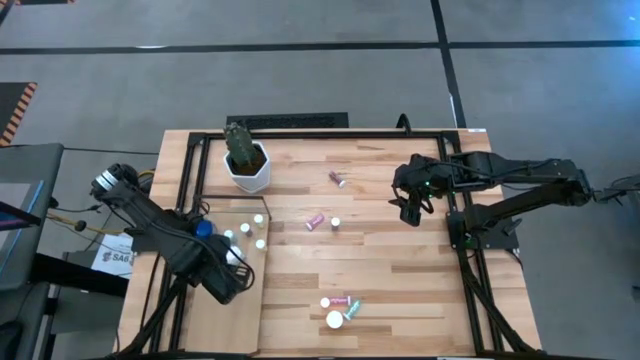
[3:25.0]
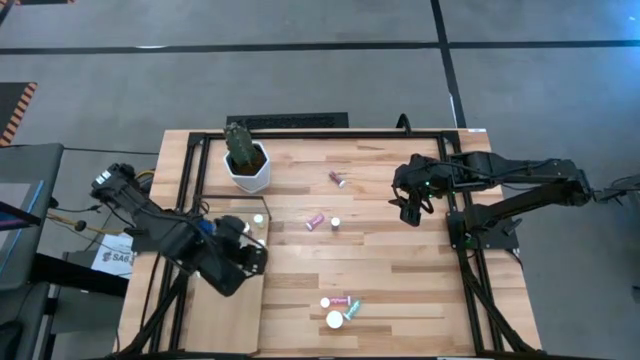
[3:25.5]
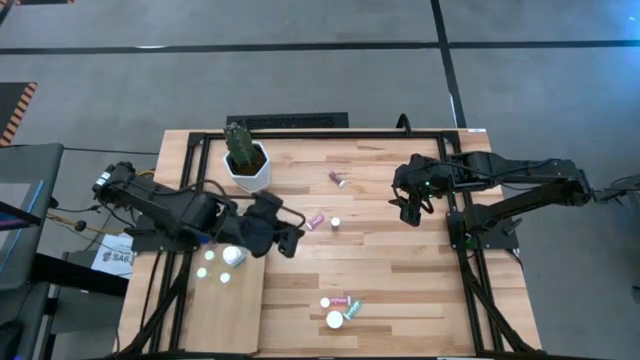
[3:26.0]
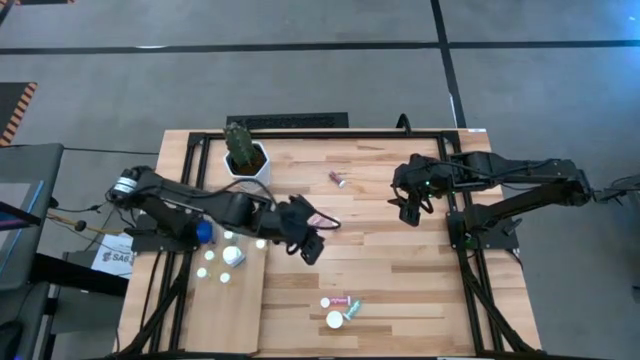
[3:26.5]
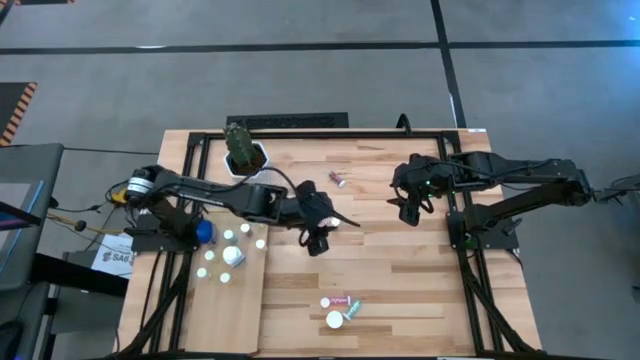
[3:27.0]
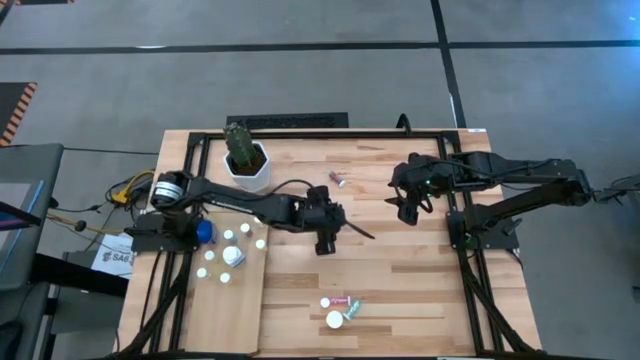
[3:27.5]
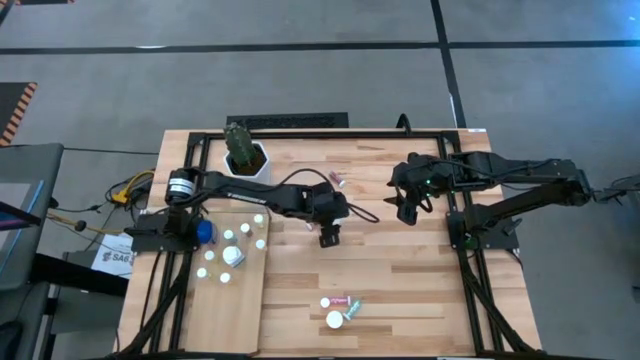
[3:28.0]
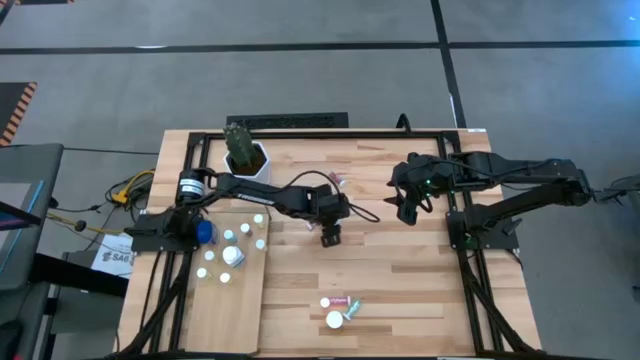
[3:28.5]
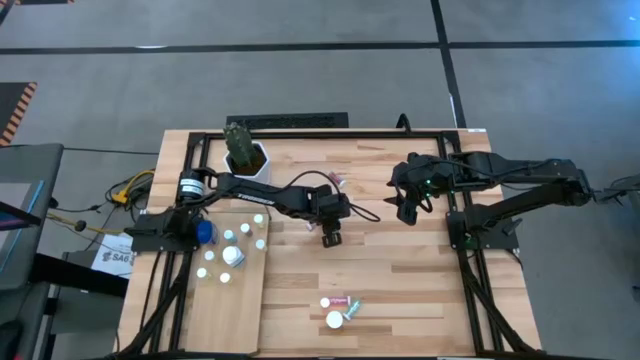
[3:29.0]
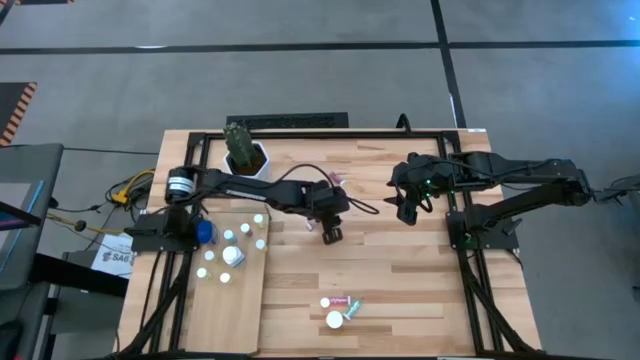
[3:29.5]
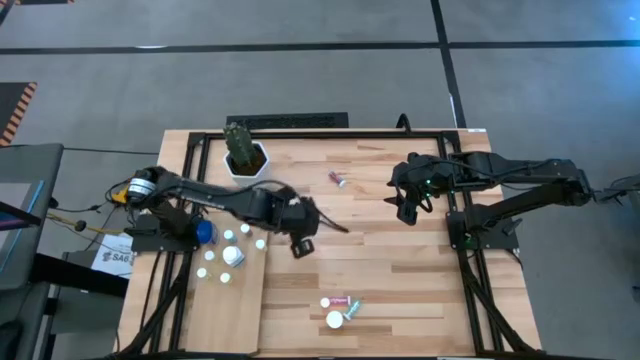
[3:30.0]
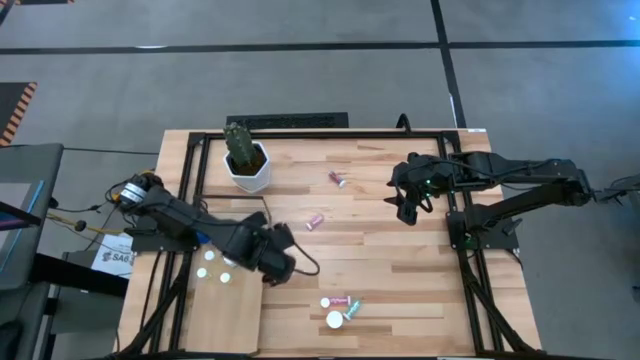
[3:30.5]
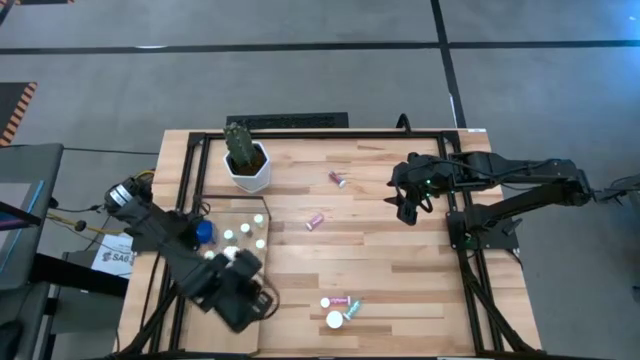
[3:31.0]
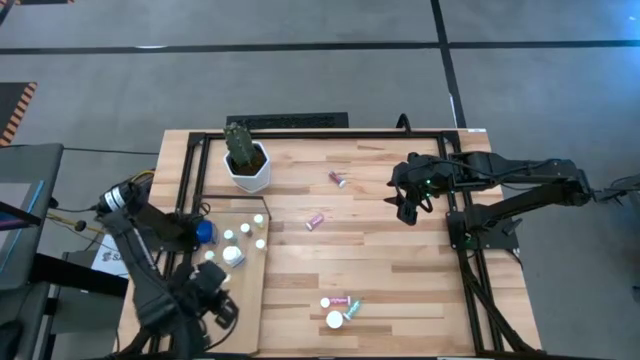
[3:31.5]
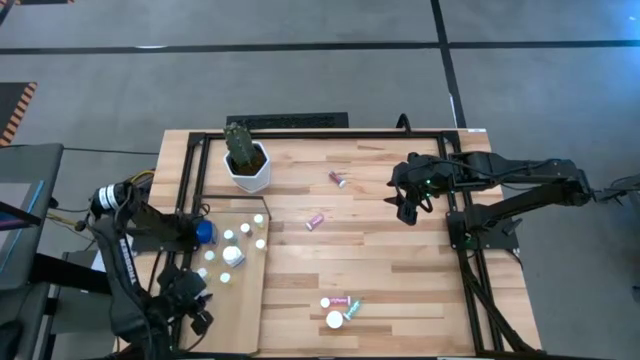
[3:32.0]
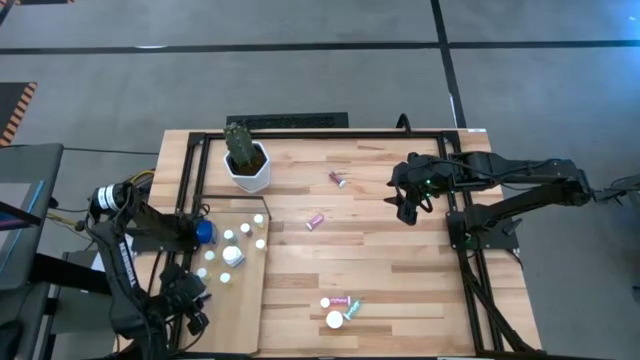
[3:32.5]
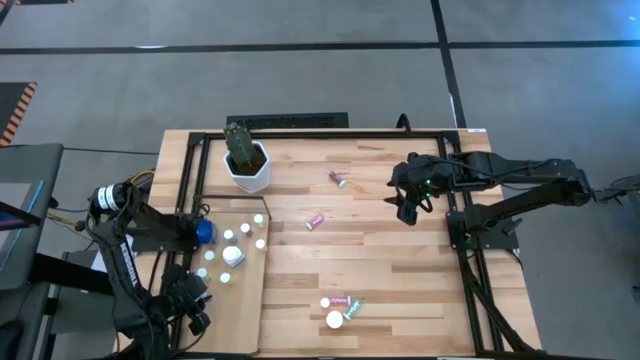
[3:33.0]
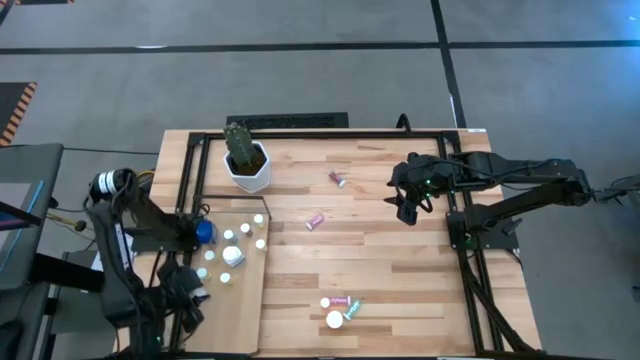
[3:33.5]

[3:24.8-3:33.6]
Task: Pick and place medicine bottles onto shelf by color
Put the light blue pill bottle on the shelf

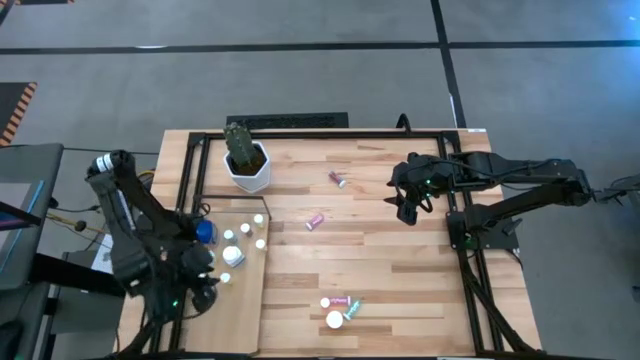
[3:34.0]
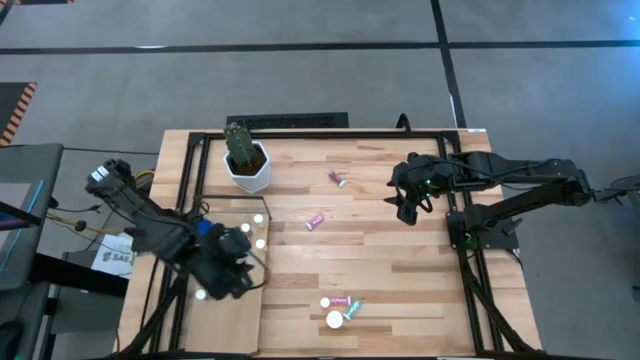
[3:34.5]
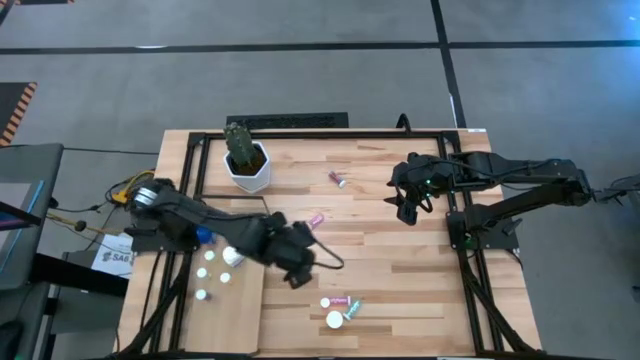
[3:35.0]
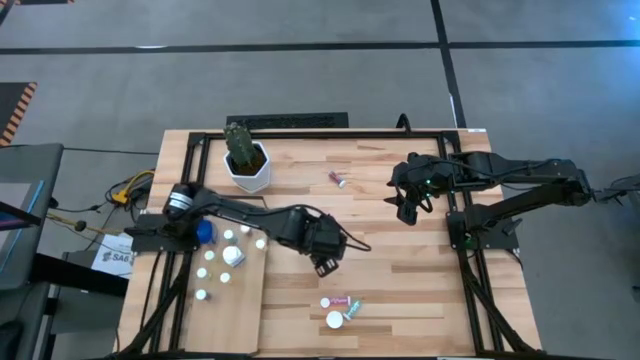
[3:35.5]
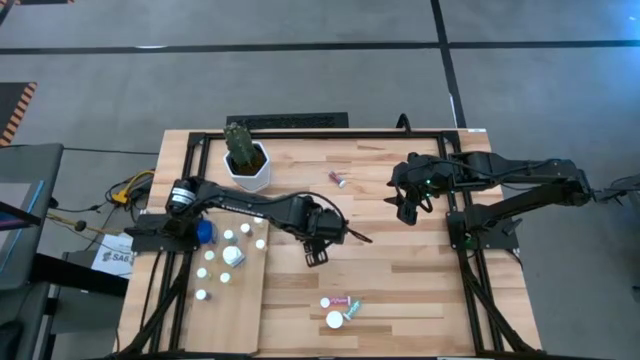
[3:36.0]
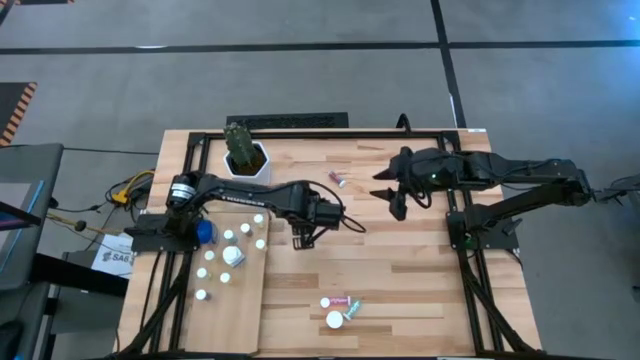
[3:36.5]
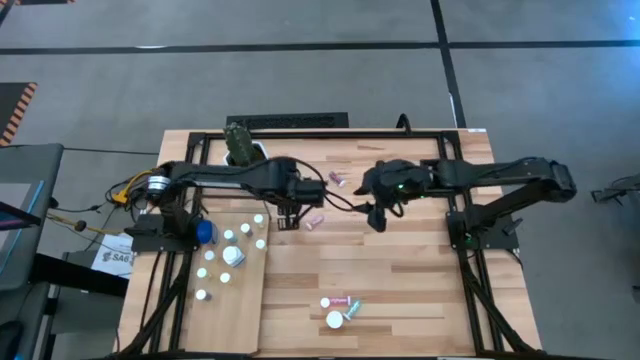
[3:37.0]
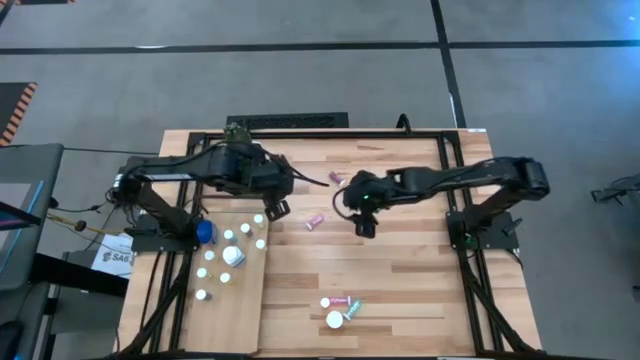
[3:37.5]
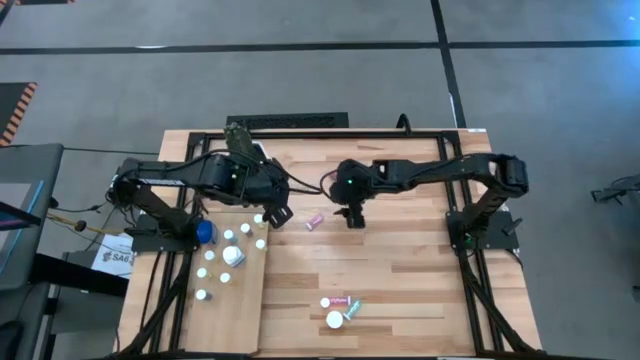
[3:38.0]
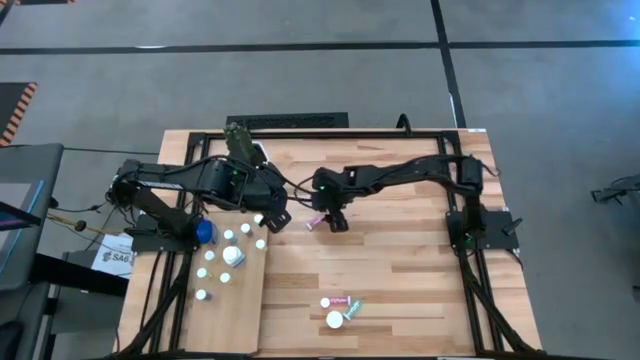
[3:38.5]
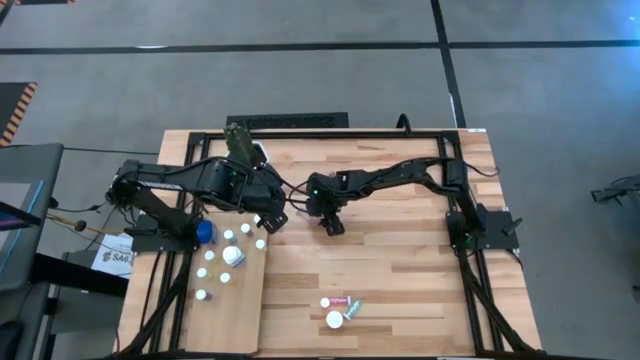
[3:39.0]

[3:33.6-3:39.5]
Put the pink pill bottle on the shelf

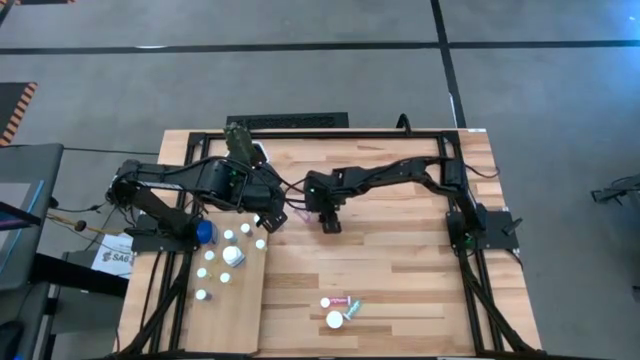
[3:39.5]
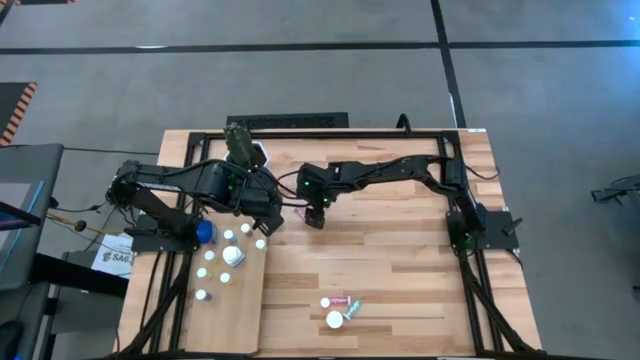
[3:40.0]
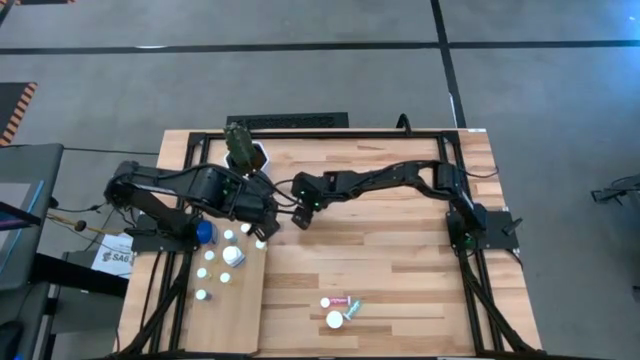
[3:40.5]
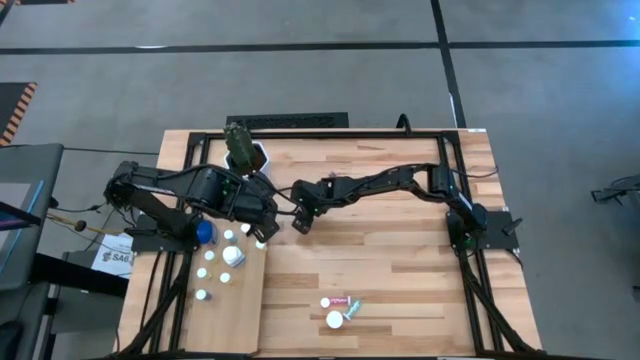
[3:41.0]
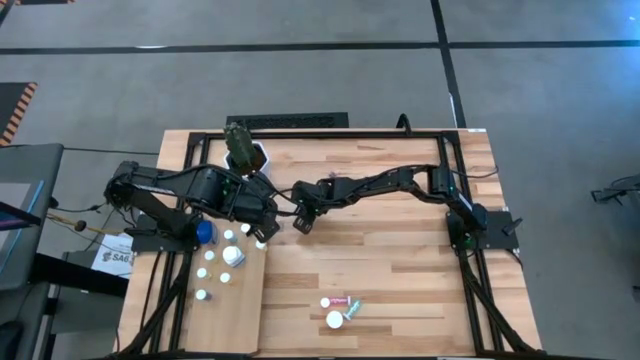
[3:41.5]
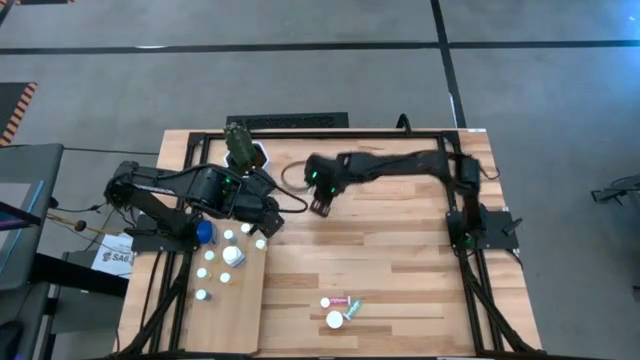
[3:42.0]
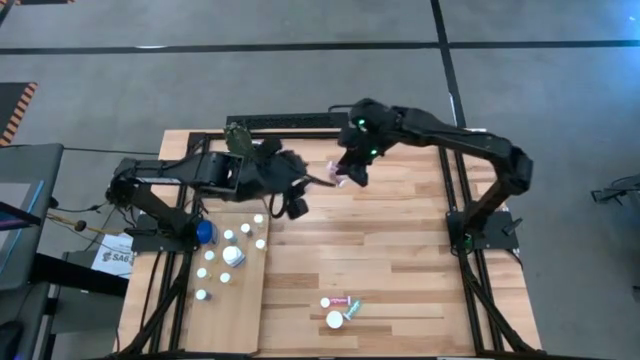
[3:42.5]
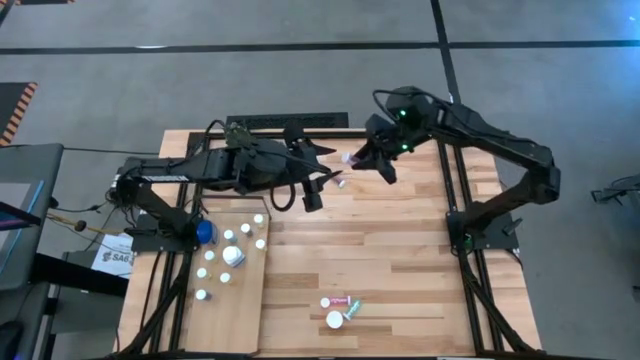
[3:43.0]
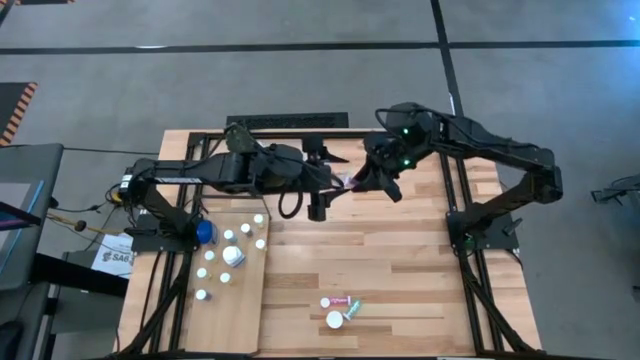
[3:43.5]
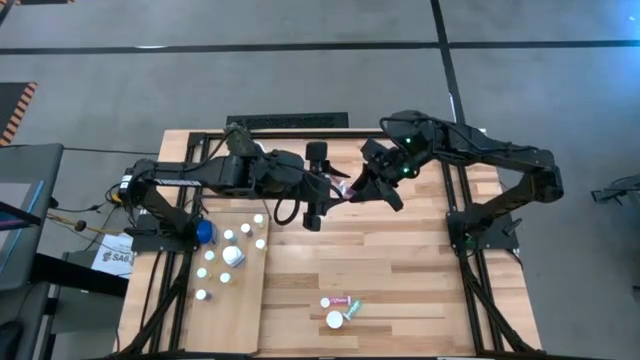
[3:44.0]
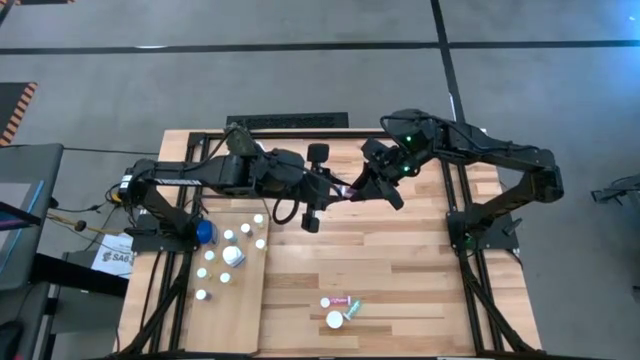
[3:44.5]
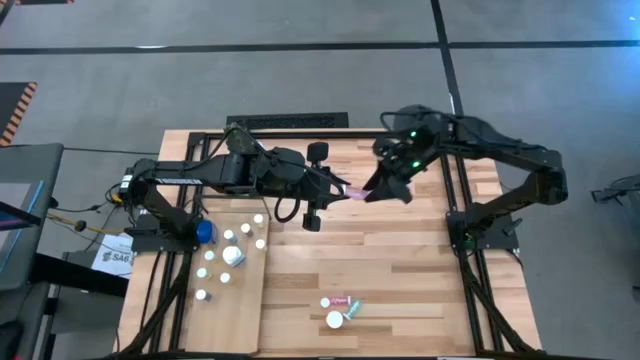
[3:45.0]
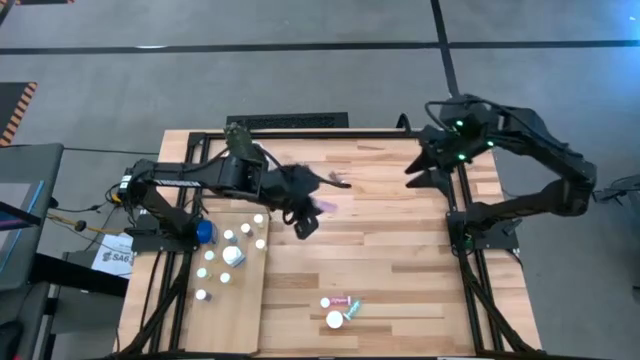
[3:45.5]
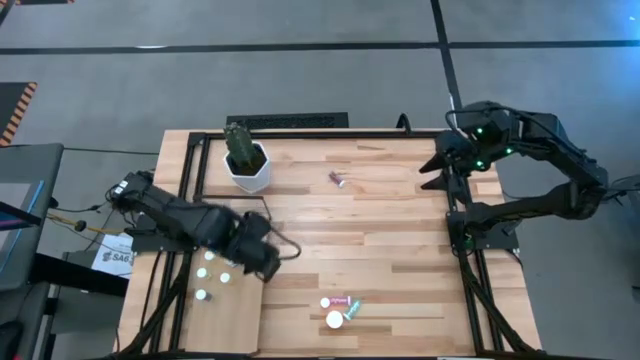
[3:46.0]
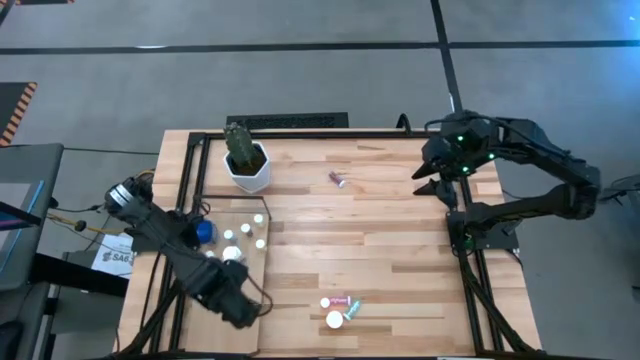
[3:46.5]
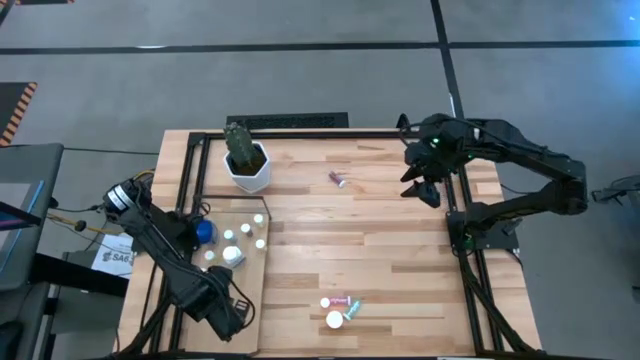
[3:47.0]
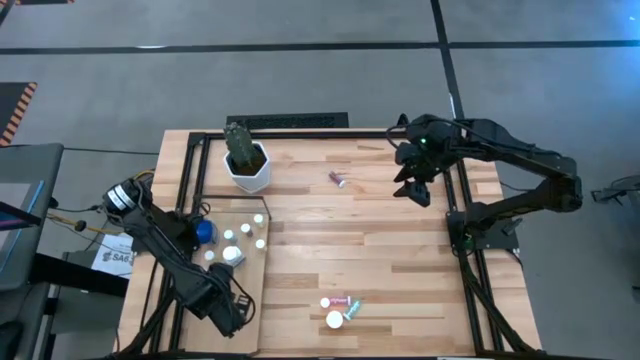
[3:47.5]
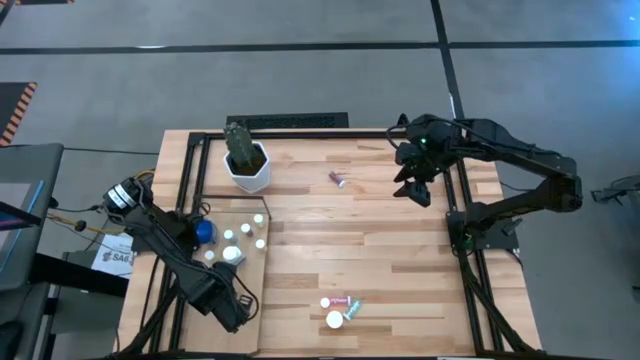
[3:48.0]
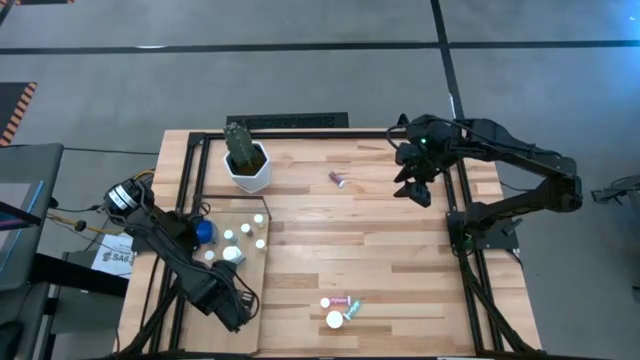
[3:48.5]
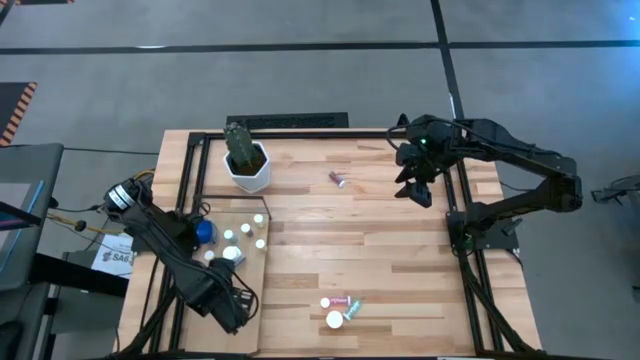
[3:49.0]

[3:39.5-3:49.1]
Put the pink pill bottle on the shelf
